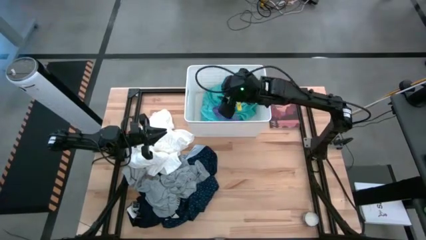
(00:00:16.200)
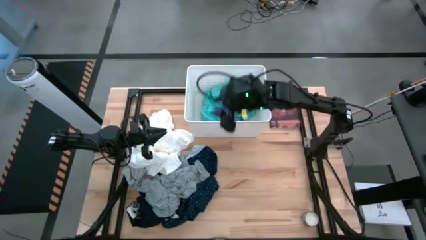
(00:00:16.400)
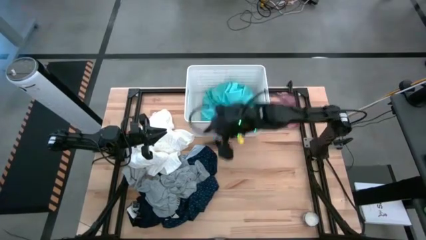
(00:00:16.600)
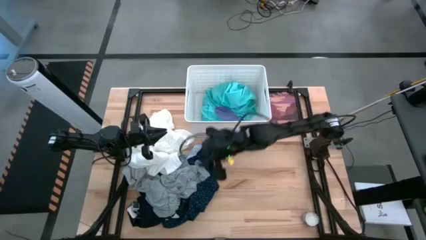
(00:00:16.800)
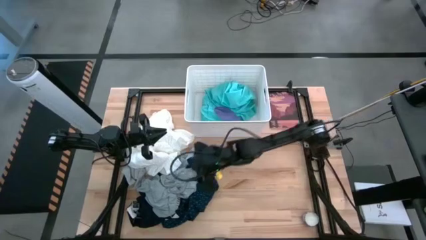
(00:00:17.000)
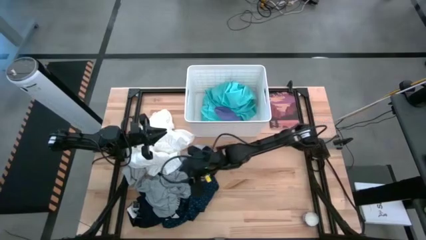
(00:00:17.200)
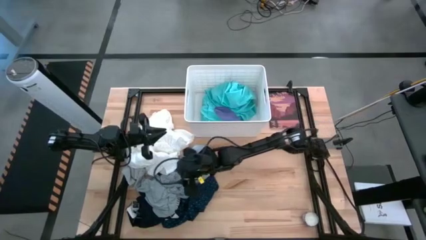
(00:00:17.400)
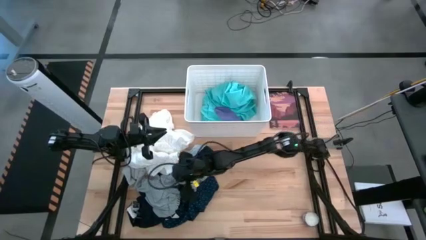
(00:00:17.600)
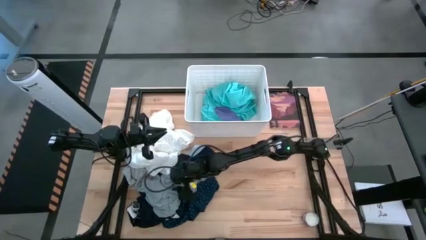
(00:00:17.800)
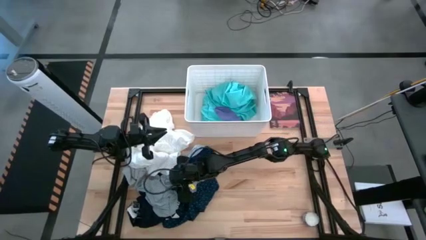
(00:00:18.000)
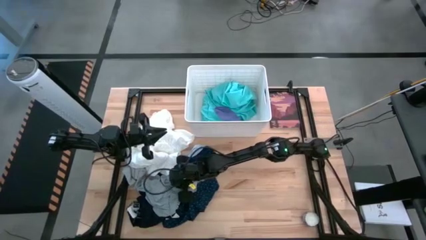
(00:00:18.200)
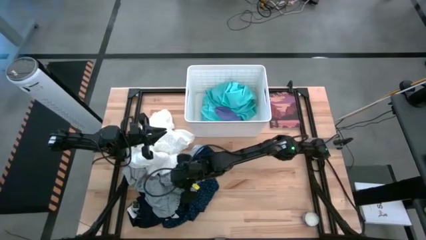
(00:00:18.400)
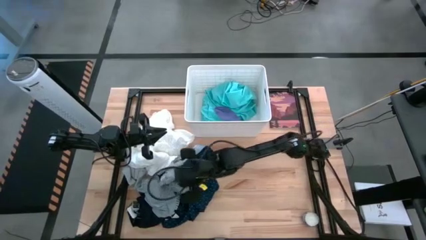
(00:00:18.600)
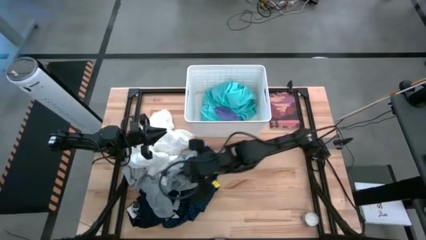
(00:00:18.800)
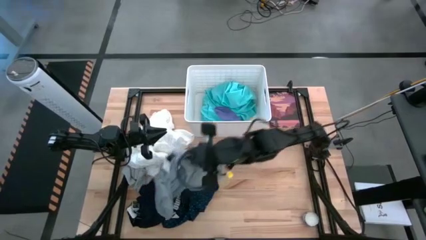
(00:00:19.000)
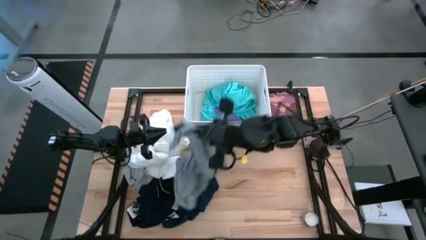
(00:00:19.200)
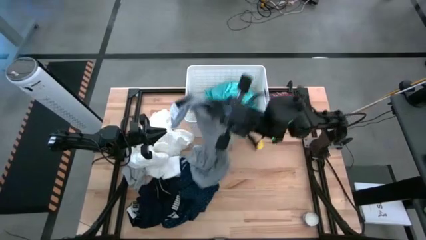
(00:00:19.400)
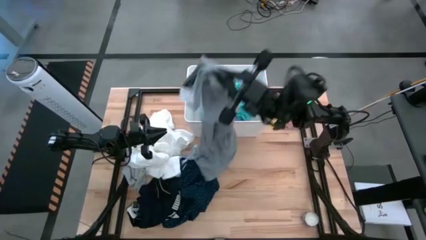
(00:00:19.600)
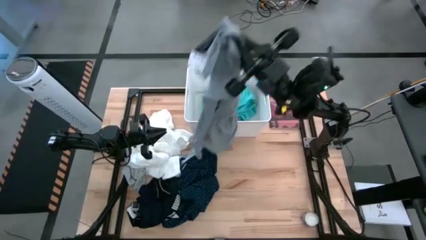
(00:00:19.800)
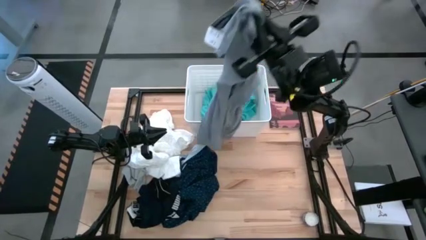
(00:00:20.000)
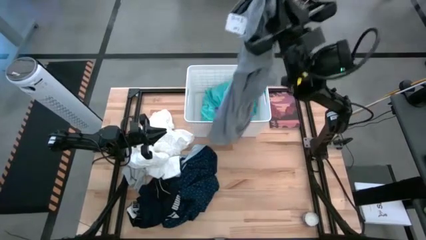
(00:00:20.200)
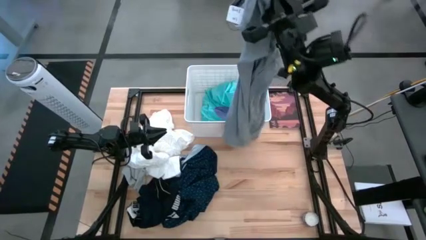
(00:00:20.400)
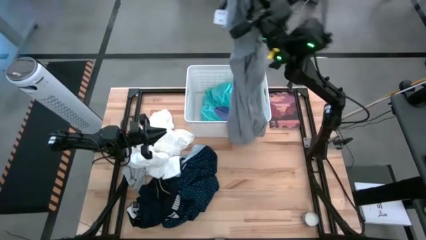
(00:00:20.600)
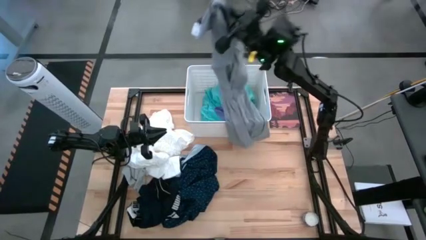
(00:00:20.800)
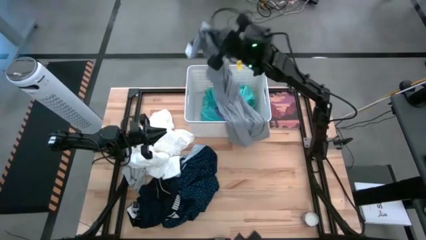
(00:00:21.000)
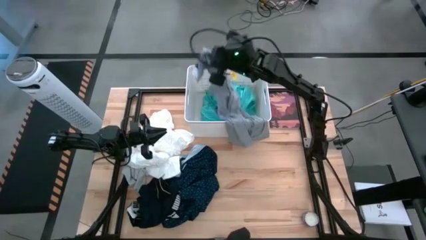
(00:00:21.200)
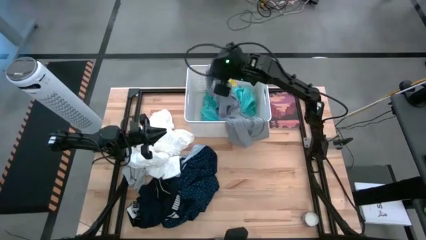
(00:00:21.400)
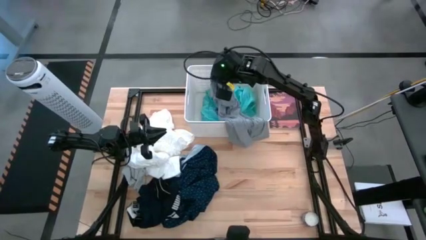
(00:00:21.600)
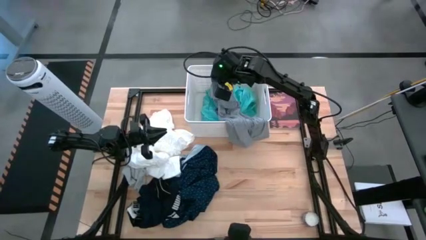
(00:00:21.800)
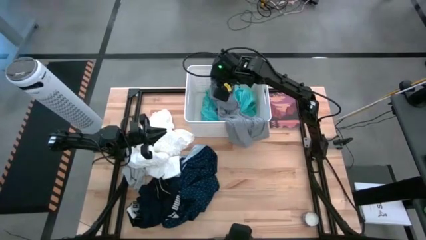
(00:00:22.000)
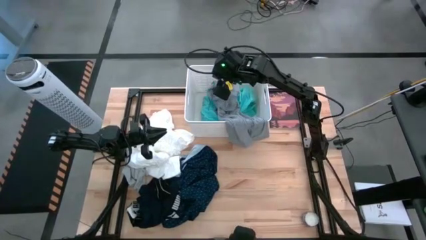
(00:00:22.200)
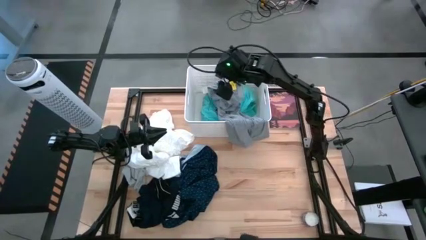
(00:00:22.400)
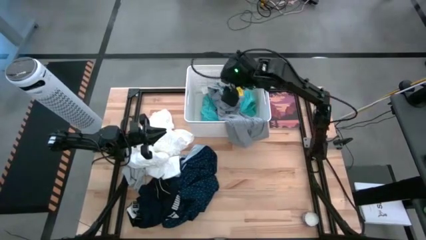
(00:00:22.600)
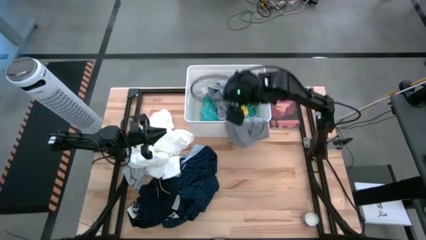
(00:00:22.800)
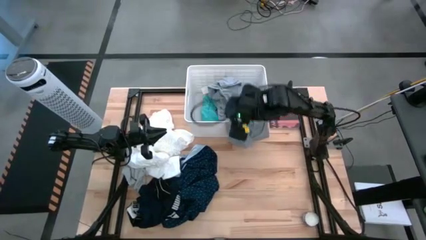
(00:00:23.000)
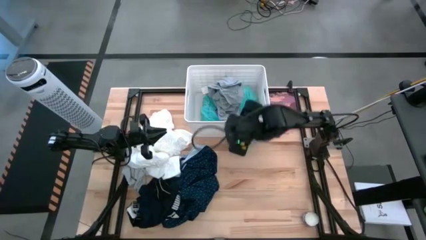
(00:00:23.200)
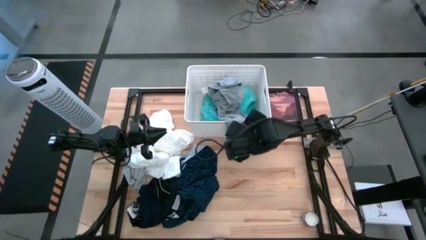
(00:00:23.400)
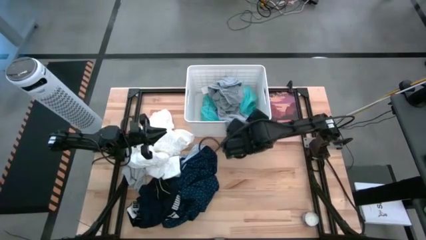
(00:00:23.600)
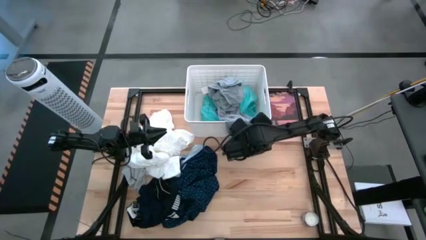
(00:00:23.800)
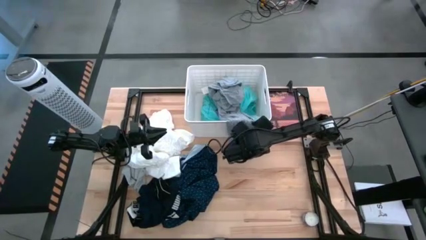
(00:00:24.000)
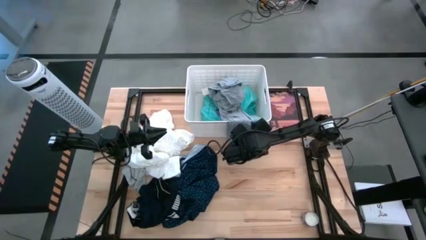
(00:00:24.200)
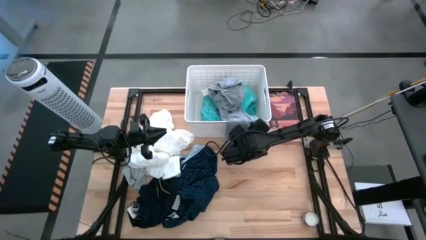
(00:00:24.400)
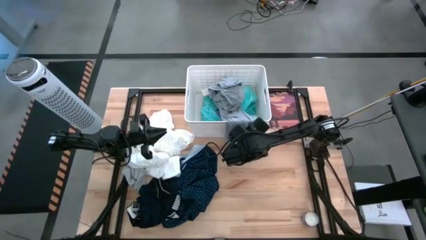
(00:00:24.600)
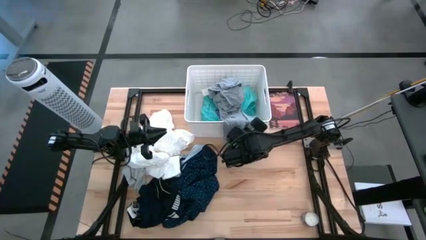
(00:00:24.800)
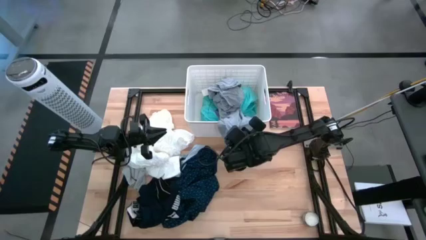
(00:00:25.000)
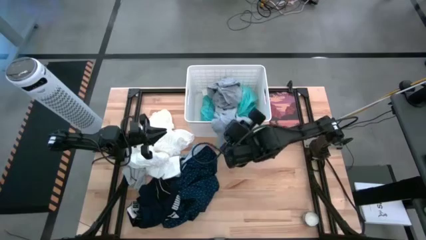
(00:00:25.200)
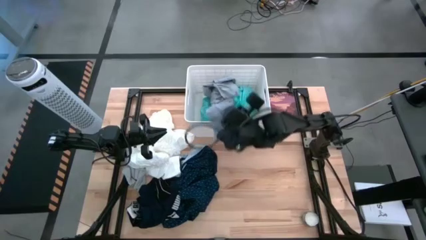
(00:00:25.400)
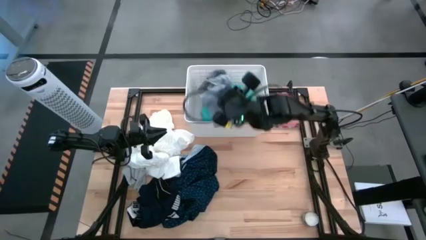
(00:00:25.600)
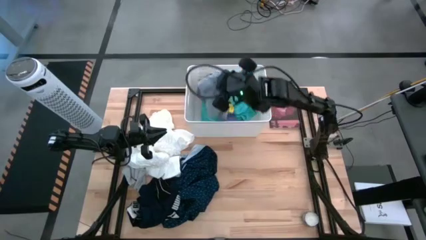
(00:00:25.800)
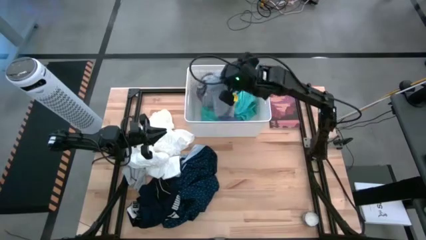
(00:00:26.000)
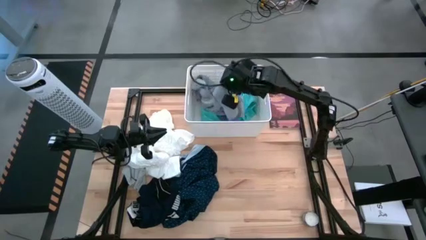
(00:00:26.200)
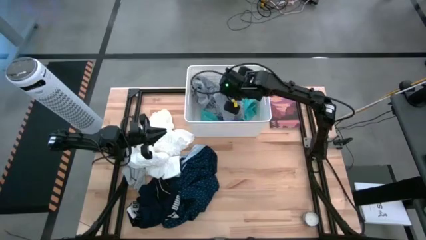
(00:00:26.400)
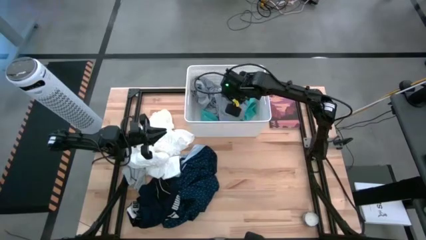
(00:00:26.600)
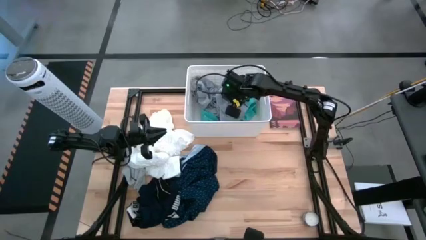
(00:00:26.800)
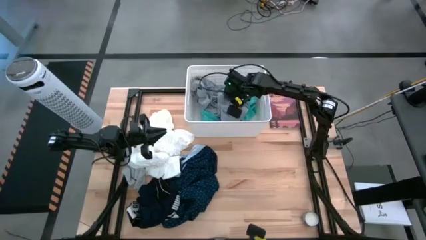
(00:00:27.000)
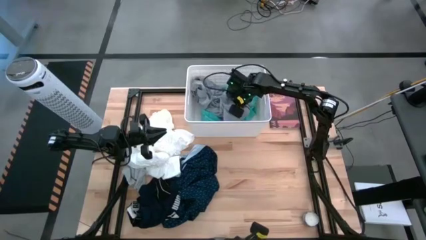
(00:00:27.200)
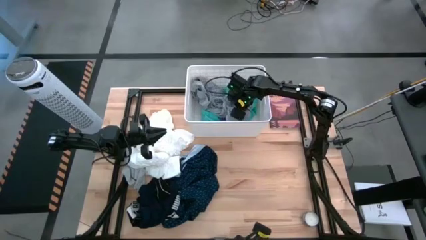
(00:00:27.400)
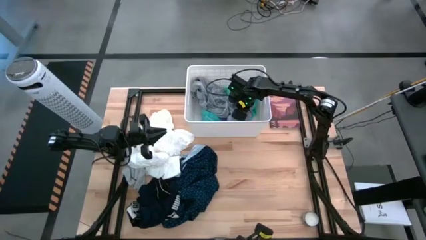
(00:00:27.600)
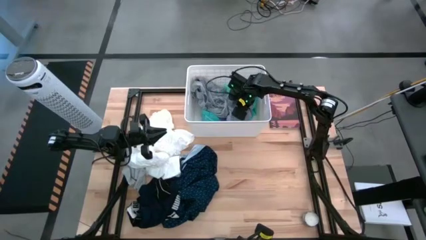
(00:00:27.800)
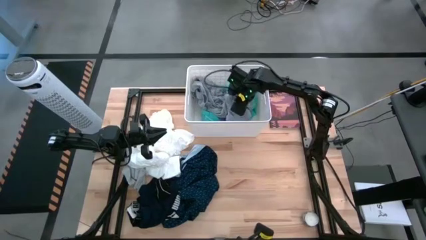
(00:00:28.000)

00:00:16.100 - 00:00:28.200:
Task: Sort clothes
Put the gray shirt into the laundry bin

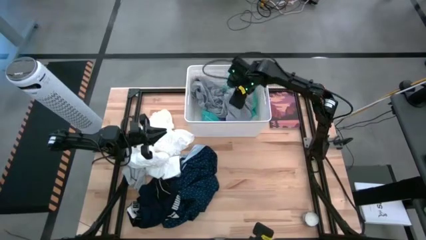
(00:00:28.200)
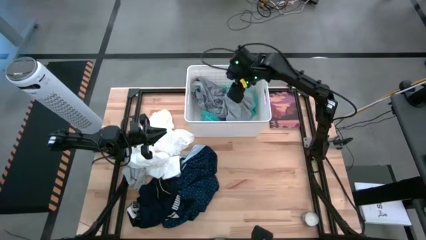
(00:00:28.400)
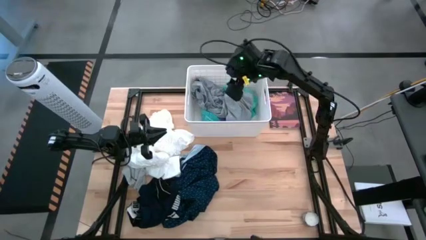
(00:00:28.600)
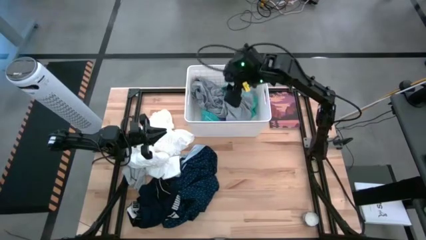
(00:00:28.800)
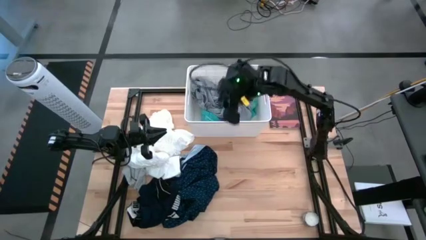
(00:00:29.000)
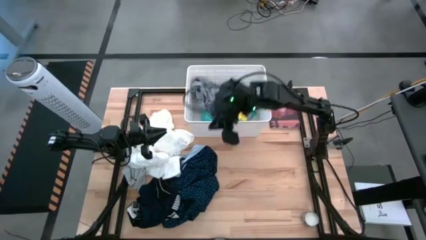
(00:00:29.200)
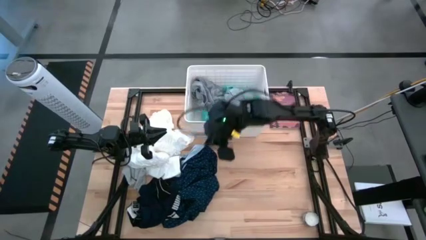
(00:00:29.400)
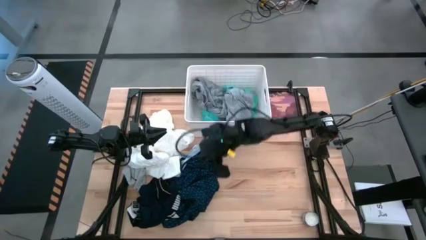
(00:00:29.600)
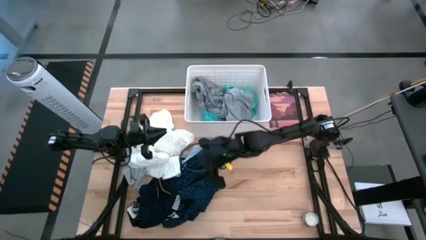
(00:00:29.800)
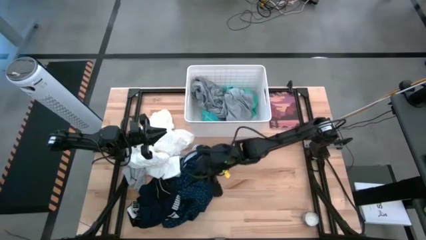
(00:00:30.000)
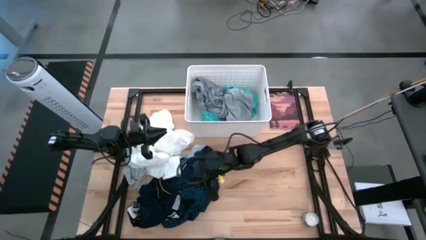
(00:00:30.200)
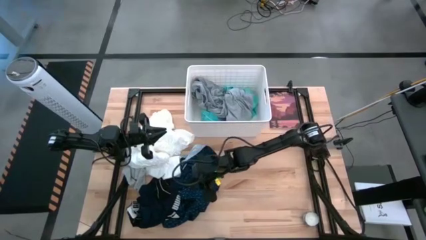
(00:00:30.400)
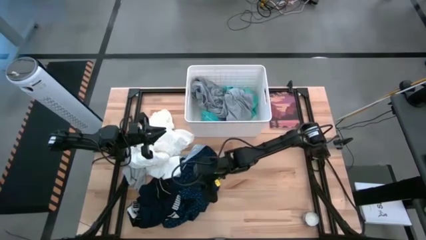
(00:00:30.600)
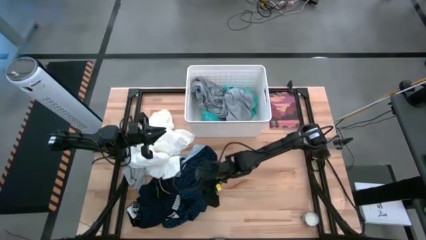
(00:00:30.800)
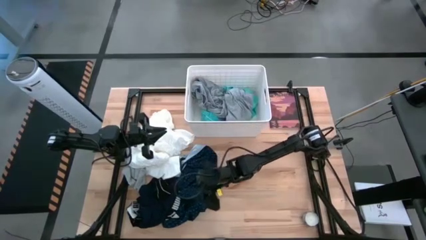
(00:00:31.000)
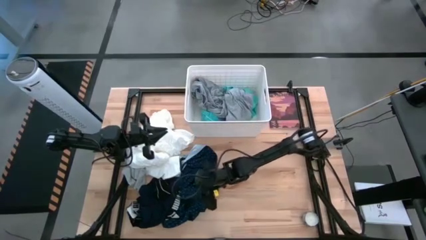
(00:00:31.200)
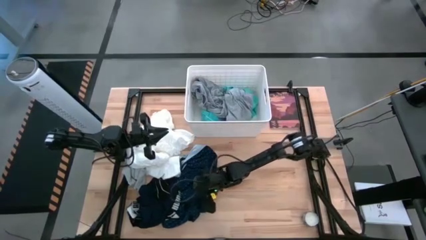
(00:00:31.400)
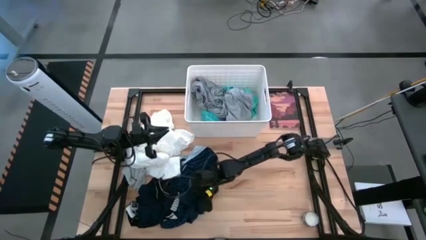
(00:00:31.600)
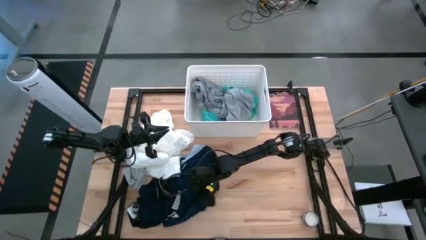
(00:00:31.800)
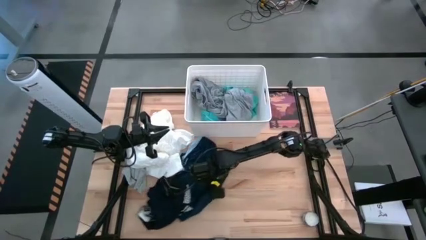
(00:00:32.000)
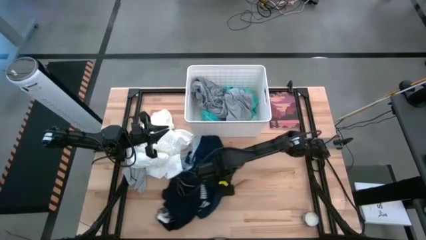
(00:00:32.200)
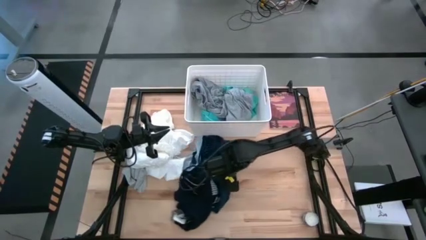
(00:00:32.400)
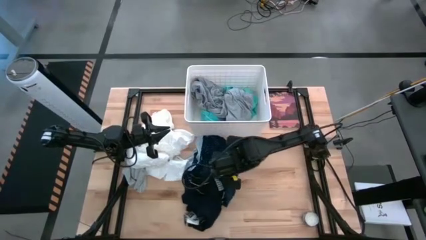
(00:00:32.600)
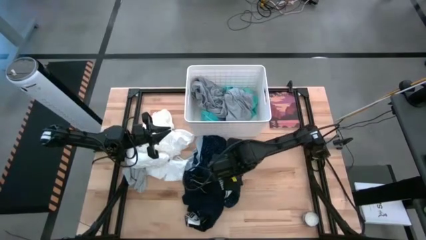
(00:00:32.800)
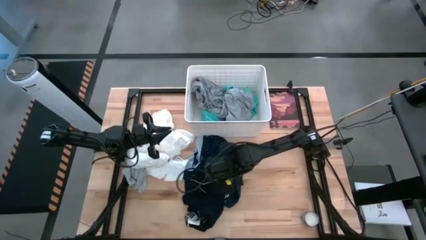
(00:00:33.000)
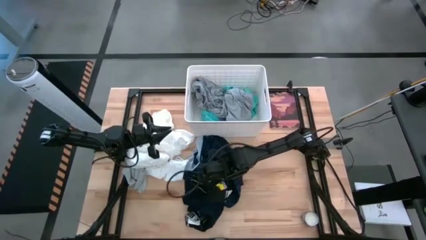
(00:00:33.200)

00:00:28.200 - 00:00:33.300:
Move the dark blue patterned polo shirt from the middle left to the center of the table

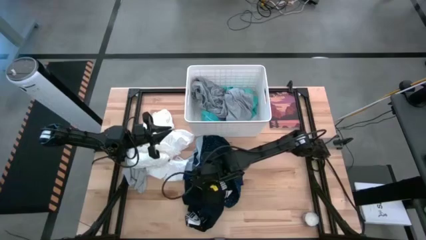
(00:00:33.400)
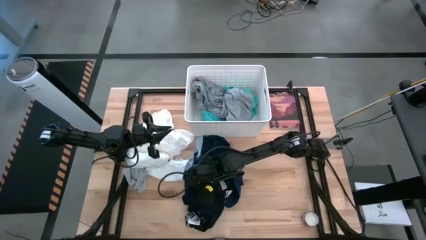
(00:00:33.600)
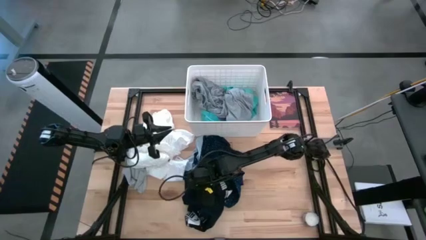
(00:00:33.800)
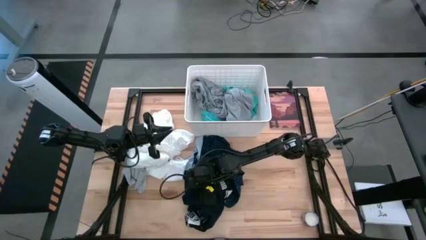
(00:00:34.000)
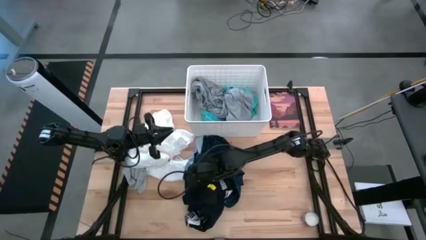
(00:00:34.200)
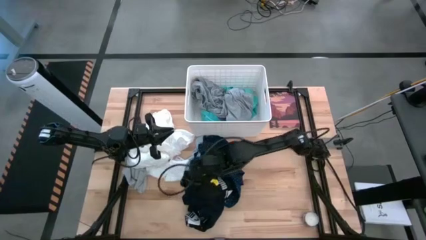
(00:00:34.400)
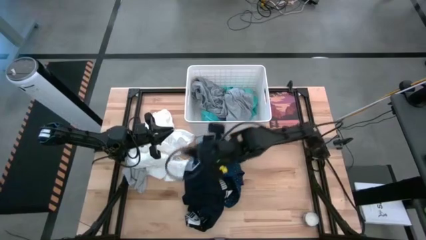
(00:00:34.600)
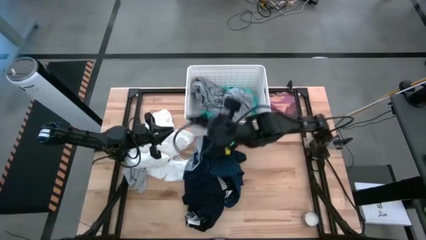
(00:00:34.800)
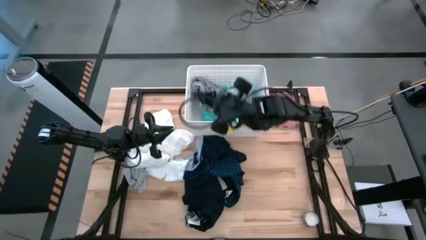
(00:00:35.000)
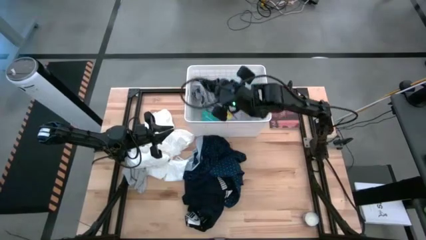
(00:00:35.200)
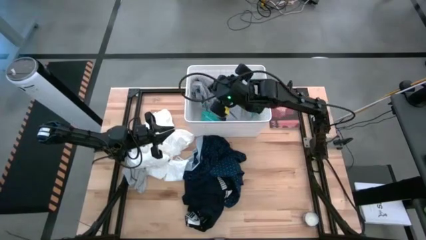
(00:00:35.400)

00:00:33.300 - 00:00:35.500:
Put the black striped sock into the laundry bin
